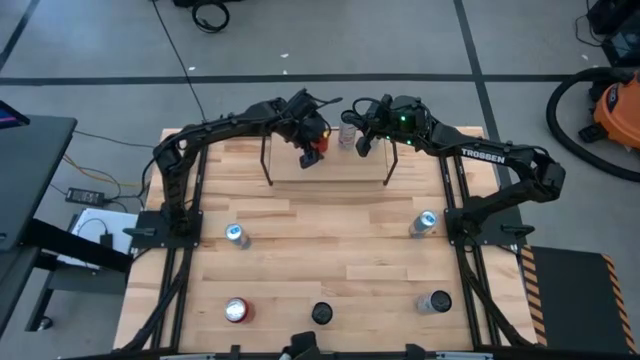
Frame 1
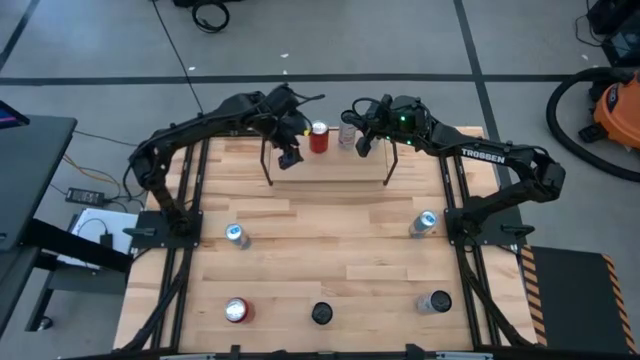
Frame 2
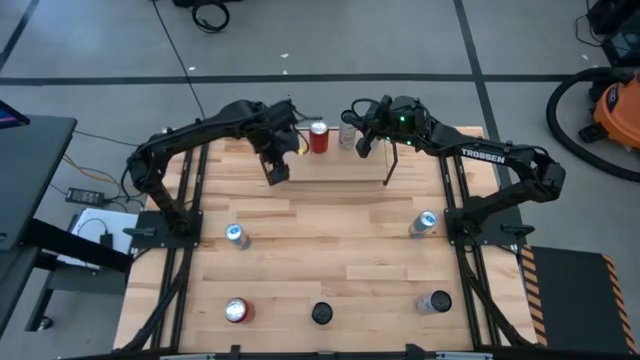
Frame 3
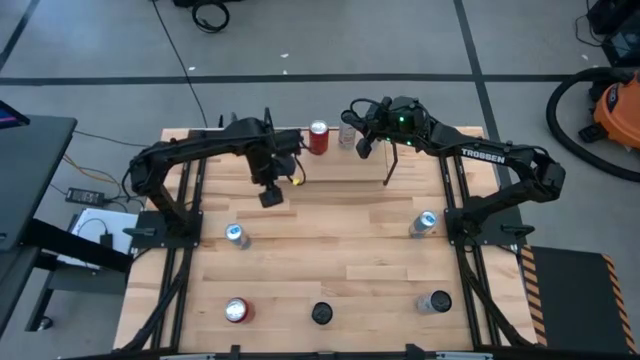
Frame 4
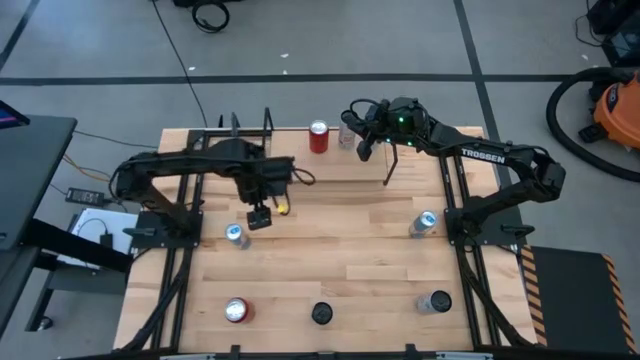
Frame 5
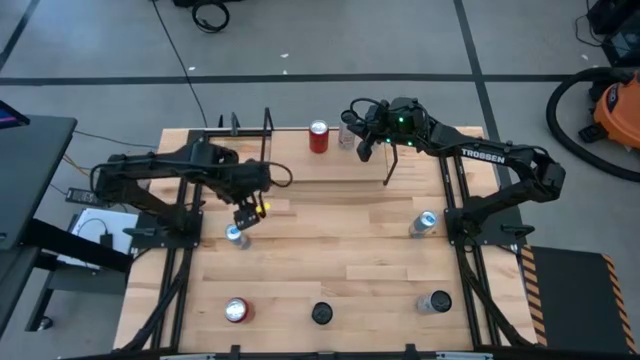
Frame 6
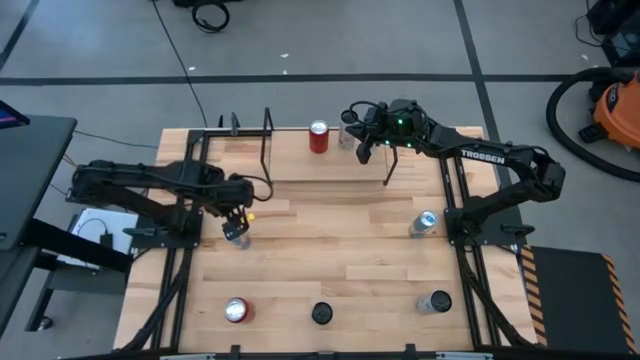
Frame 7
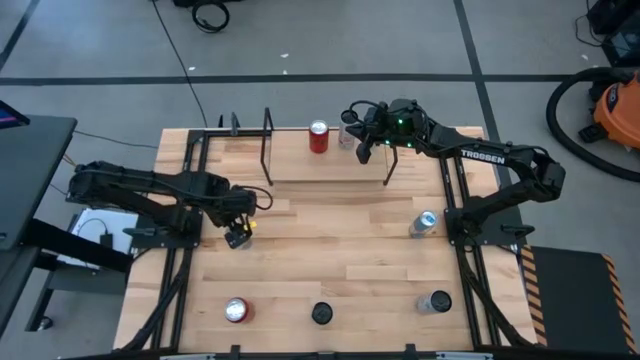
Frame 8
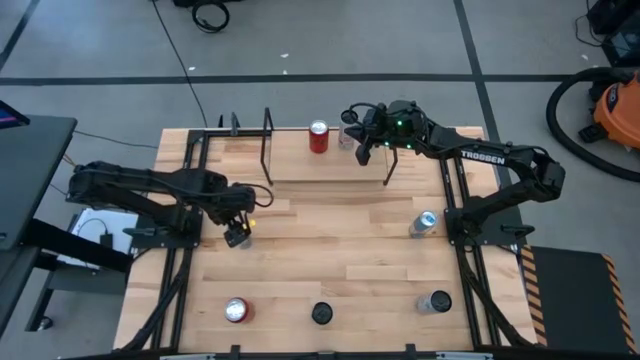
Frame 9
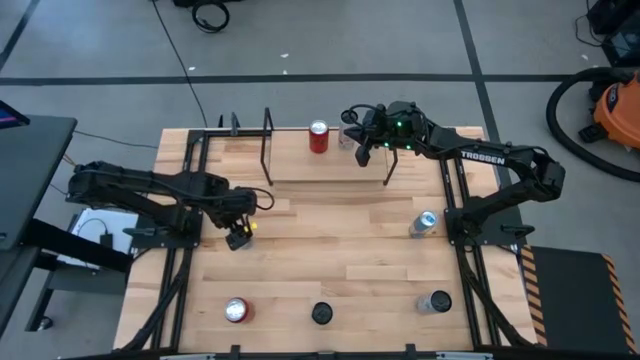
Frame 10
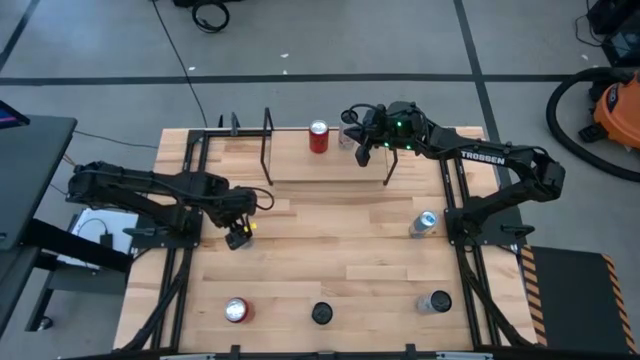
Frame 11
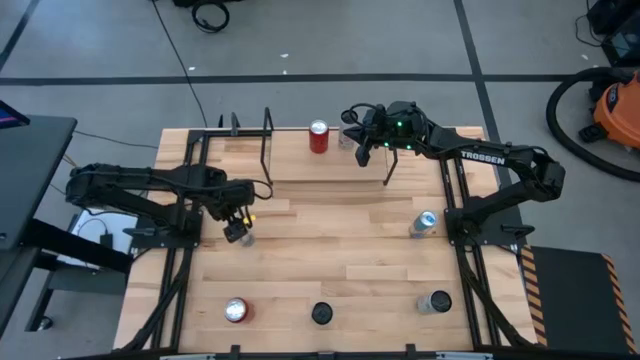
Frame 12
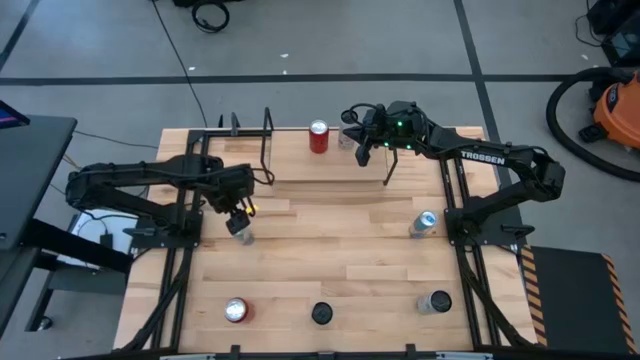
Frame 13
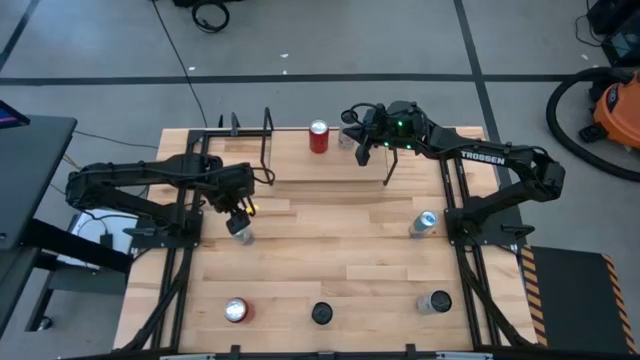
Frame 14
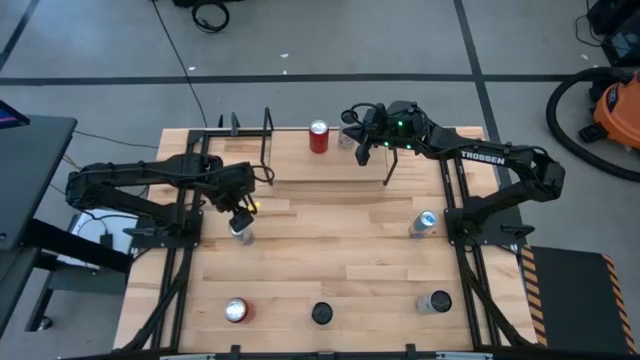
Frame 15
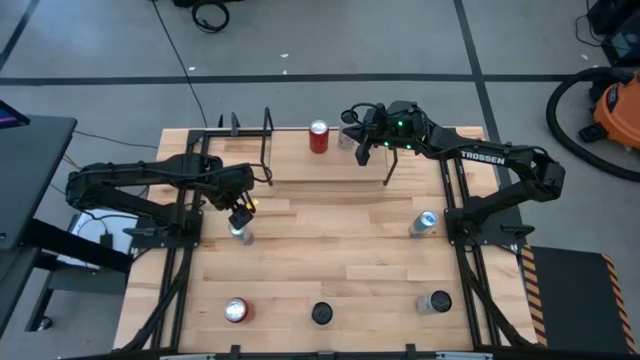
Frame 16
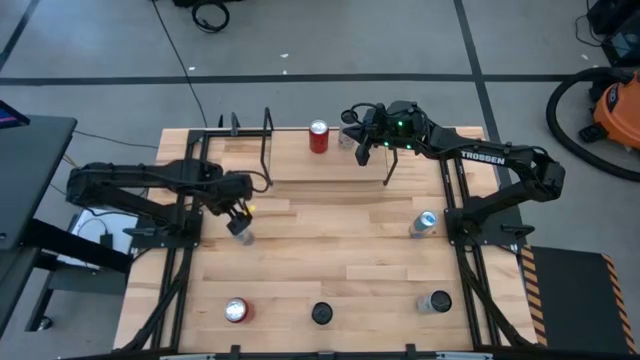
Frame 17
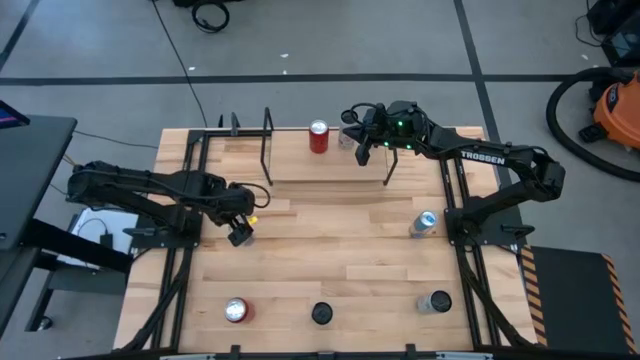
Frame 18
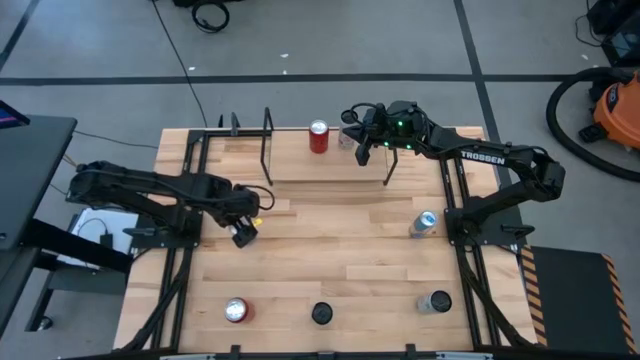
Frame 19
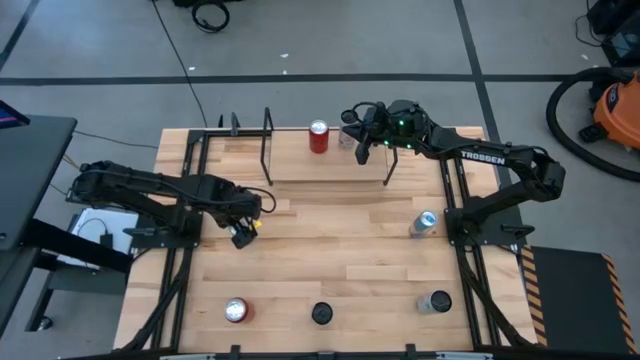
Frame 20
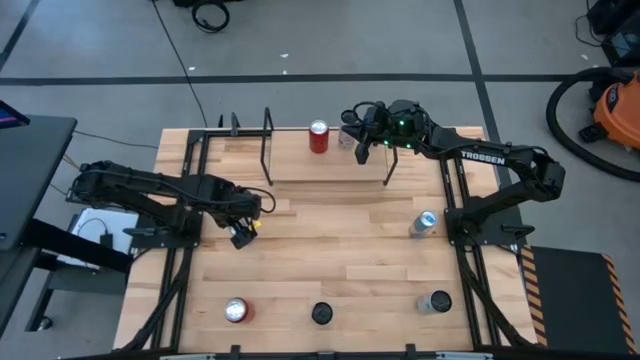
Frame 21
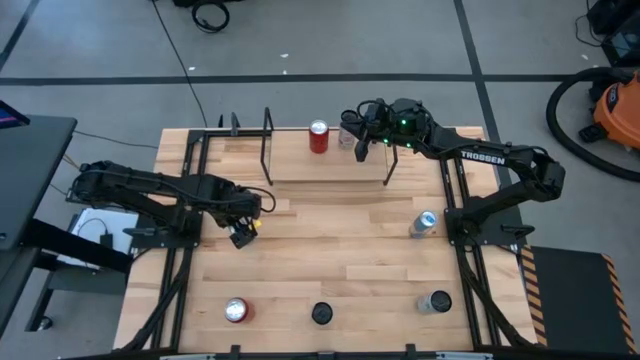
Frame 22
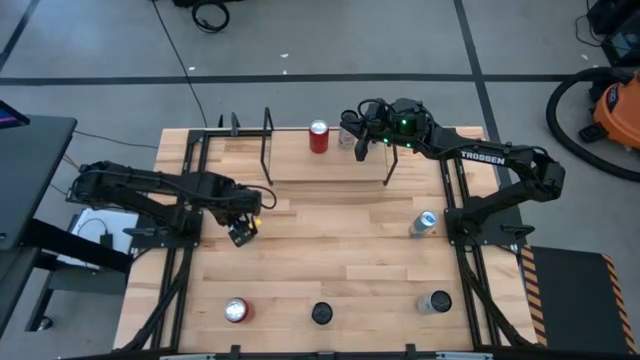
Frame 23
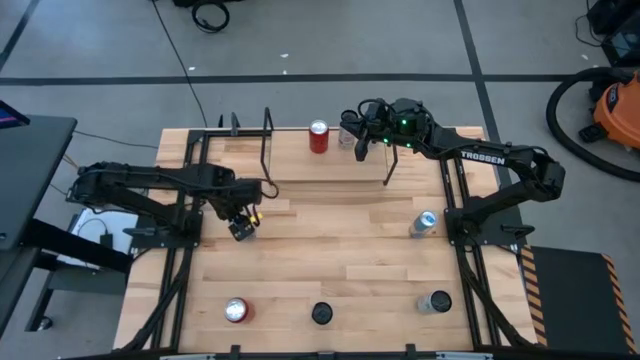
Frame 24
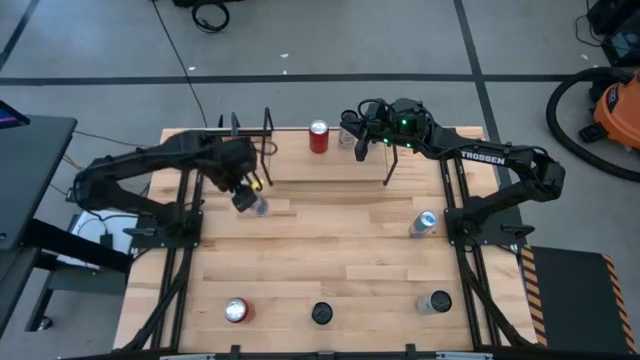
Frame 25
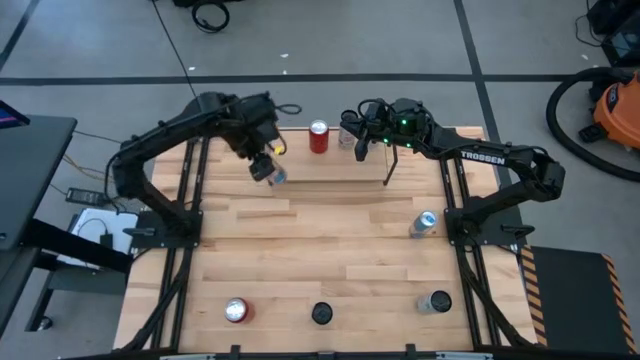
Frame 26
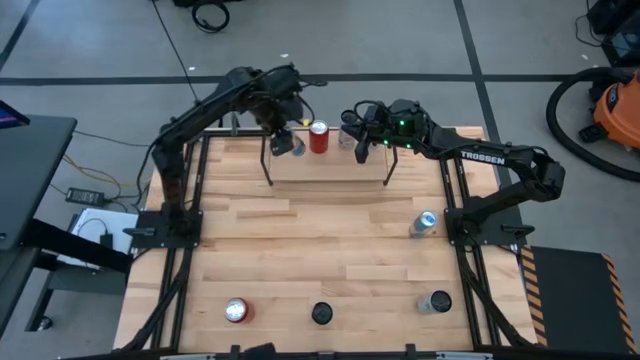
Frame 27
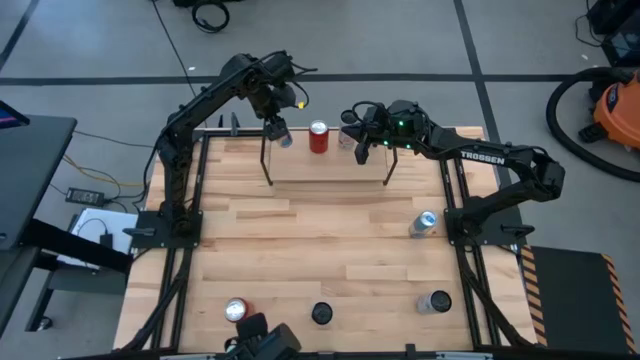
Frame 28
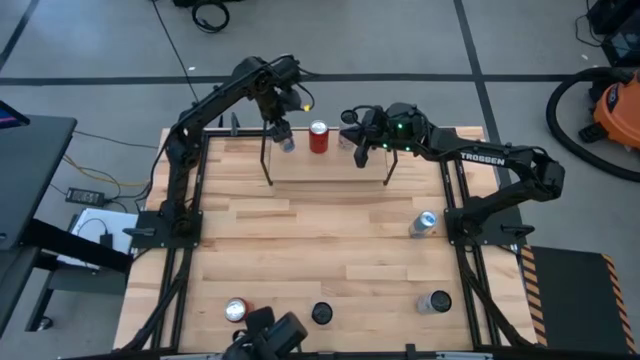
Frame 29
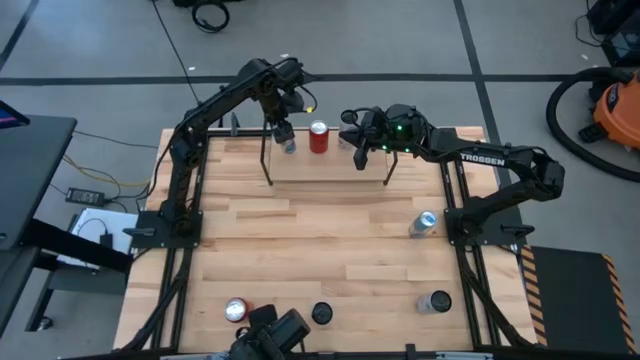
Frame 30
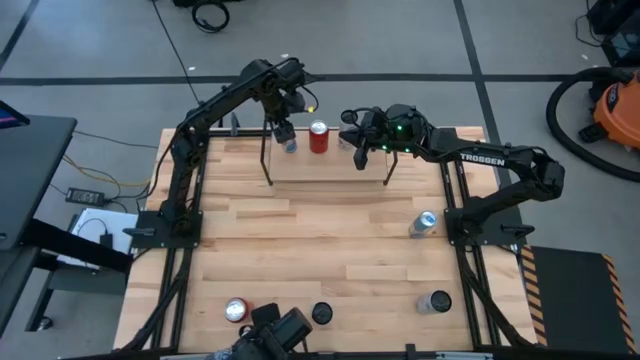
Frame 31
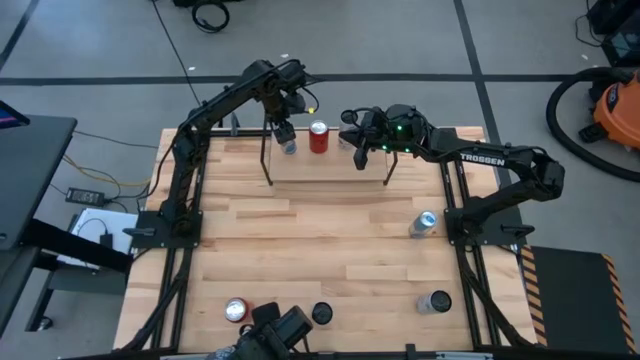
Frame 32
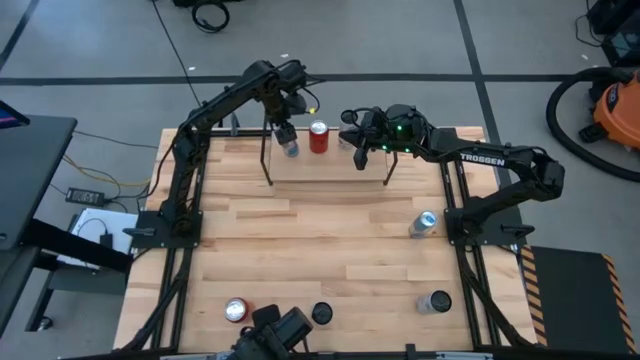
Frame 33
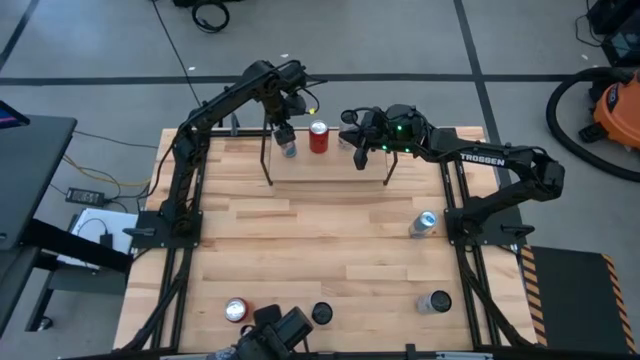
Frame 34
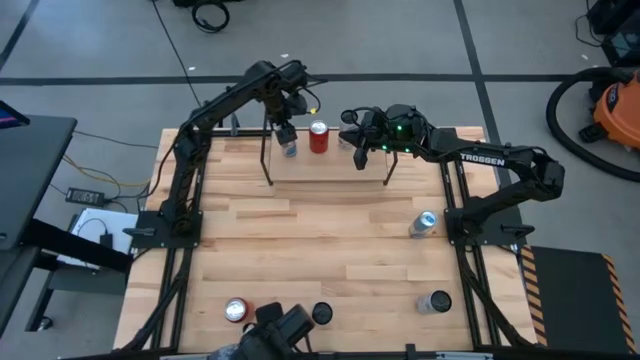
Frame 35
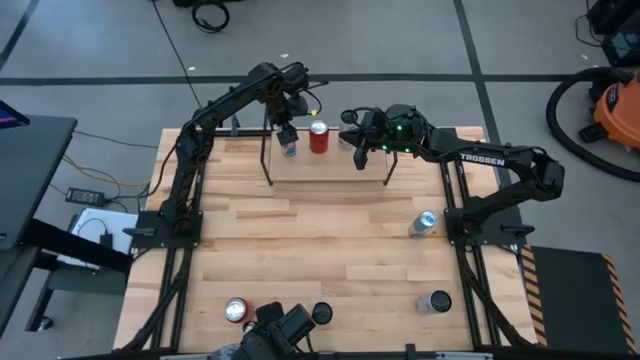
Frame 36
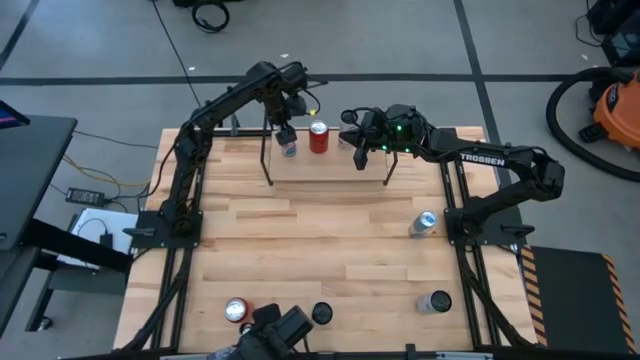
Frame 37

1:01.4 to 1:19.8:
Task: Place canned beverage on shelf
Put the left blue soda can on the shelf

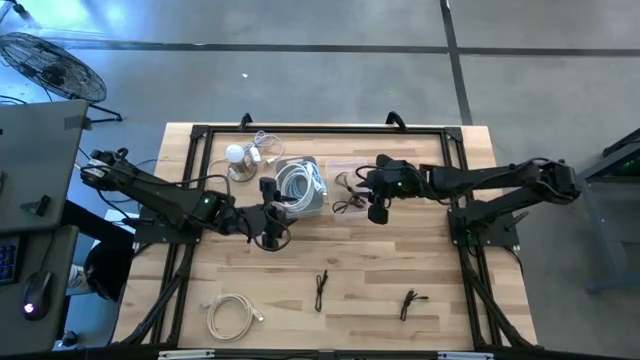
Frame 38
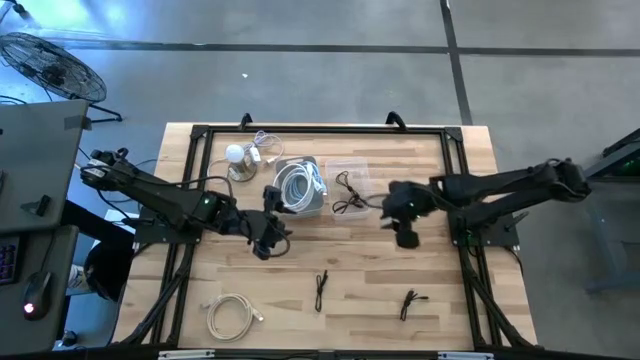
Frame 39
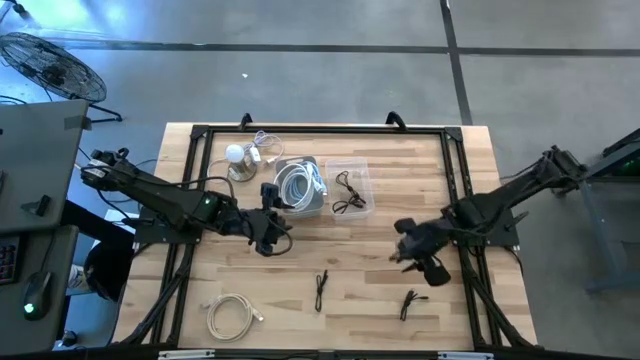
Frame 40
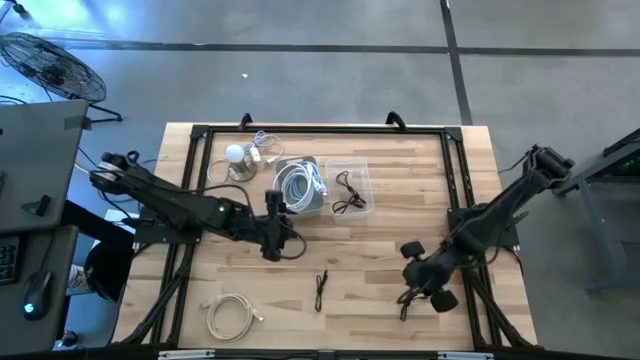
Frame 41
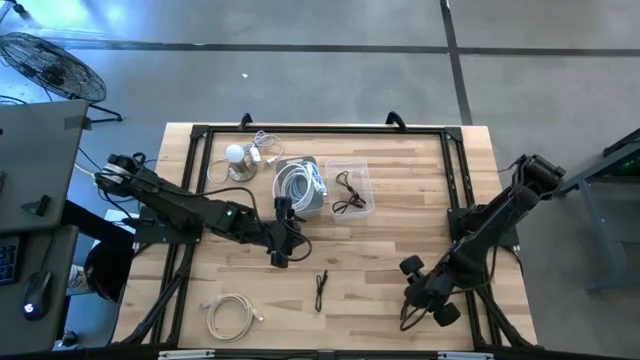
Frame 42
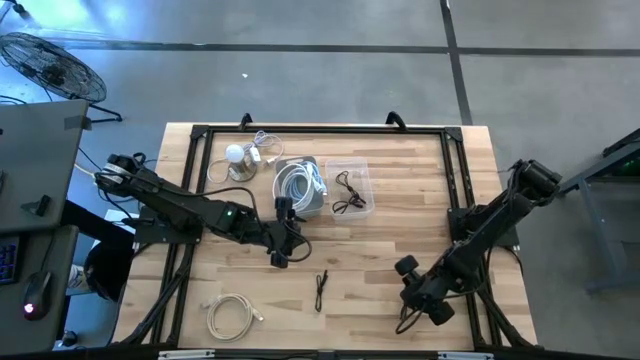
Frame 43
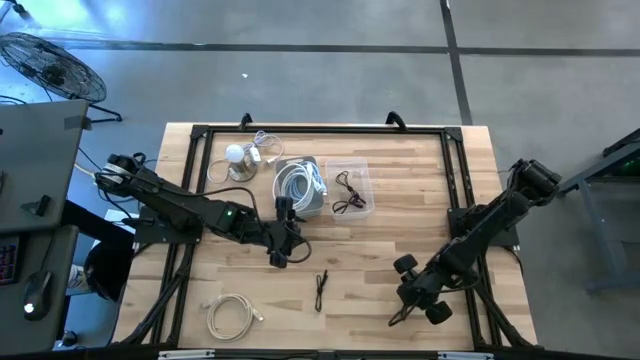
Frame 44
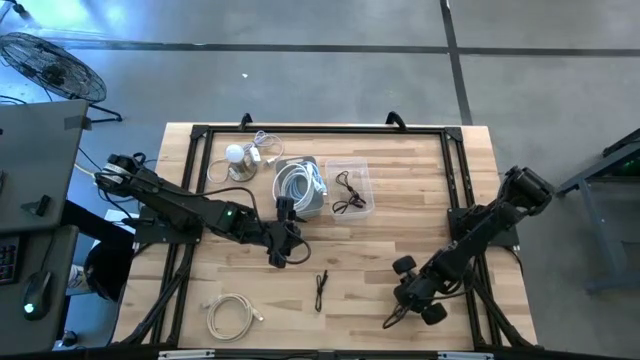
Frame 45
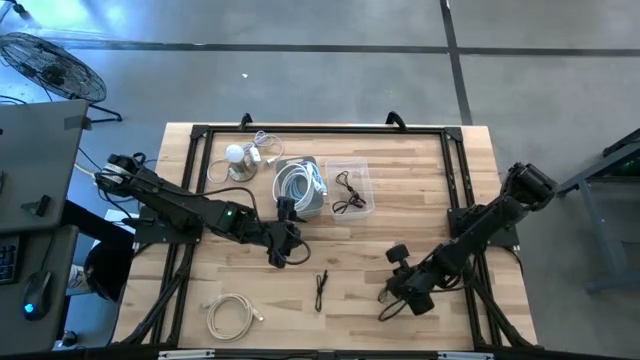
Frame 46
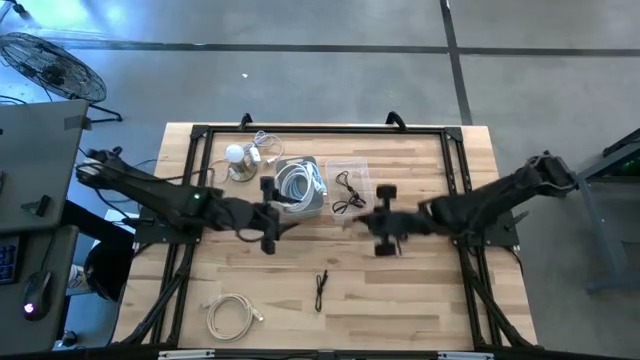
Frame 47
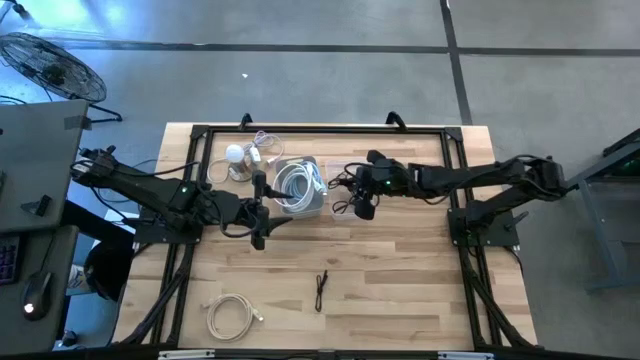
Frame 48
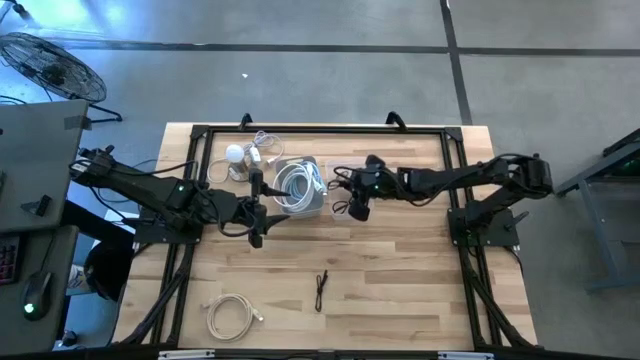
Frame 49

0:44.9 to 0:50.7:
Task: Pick & Place USB Port
Put the black charger cable into the transparent bin
